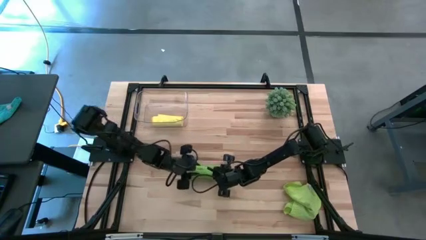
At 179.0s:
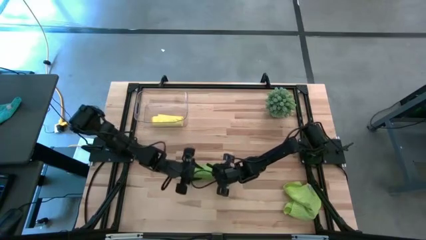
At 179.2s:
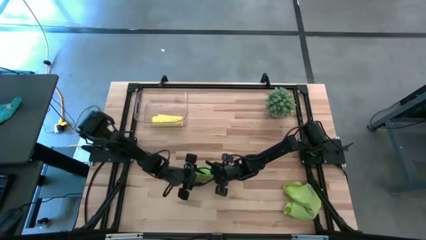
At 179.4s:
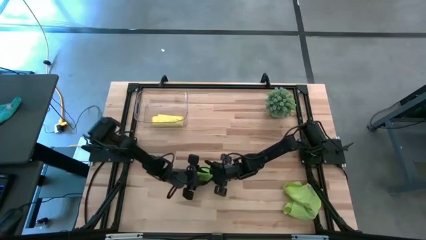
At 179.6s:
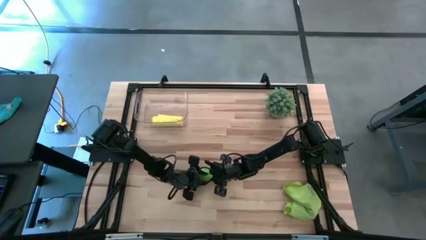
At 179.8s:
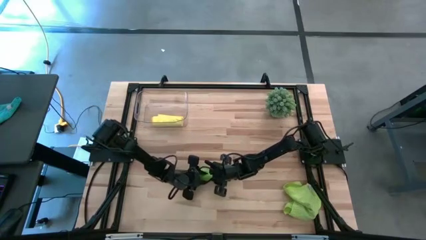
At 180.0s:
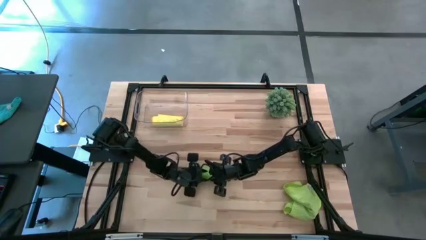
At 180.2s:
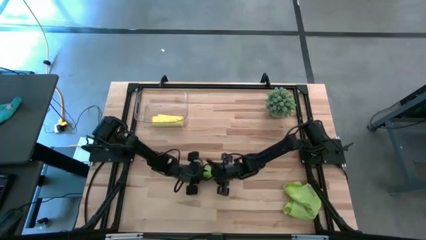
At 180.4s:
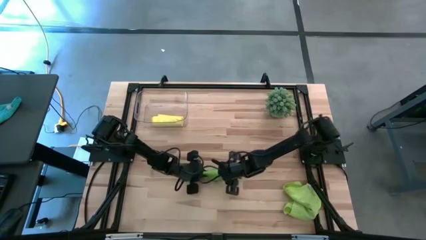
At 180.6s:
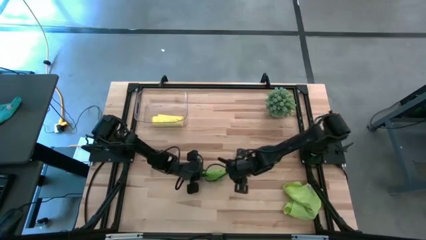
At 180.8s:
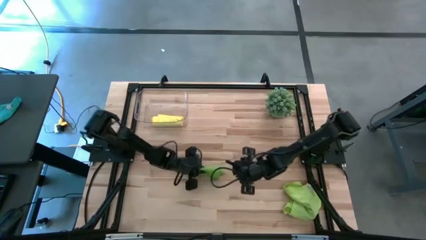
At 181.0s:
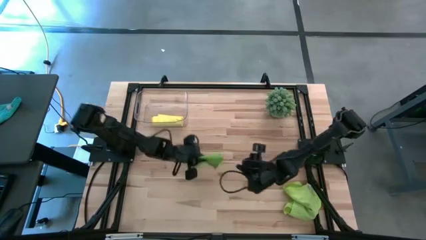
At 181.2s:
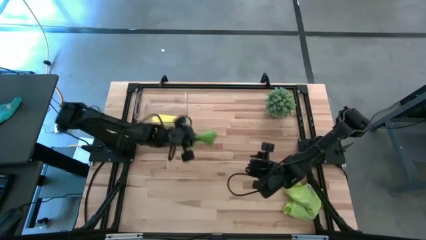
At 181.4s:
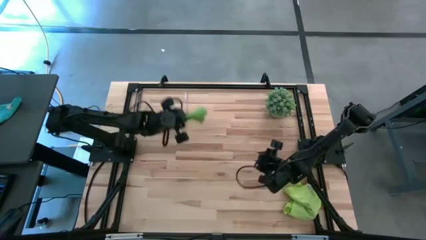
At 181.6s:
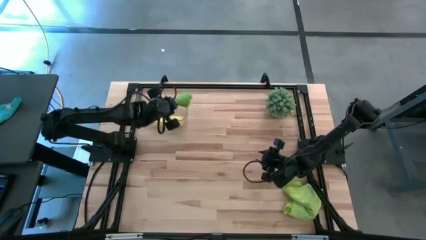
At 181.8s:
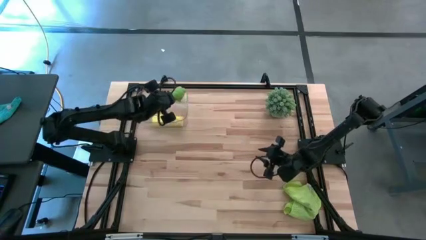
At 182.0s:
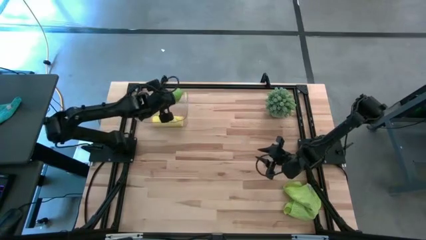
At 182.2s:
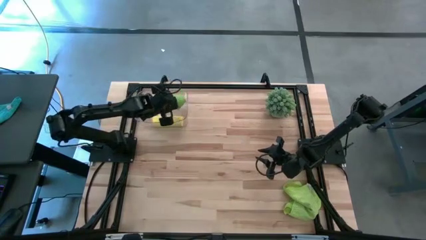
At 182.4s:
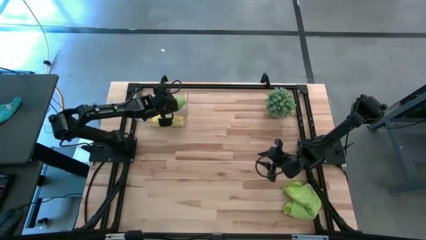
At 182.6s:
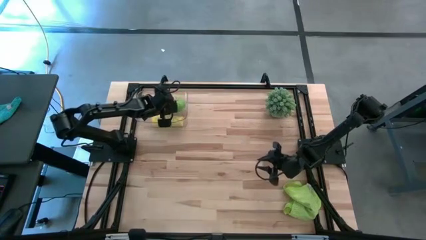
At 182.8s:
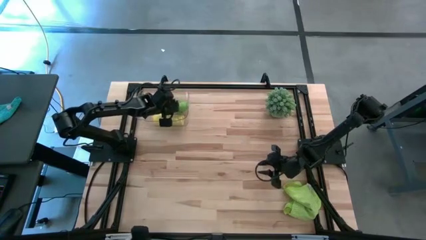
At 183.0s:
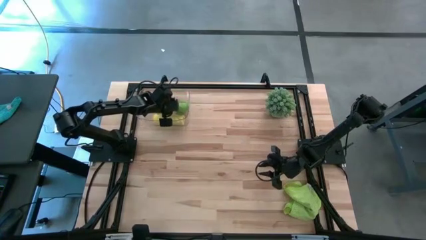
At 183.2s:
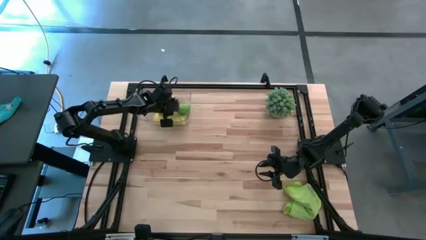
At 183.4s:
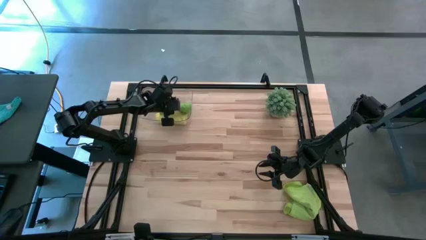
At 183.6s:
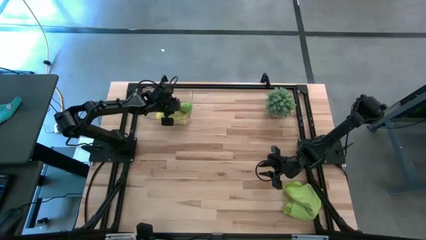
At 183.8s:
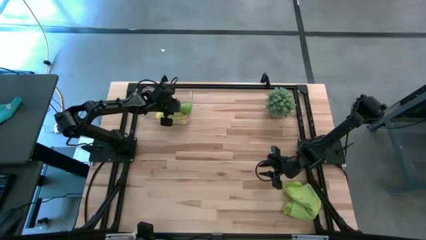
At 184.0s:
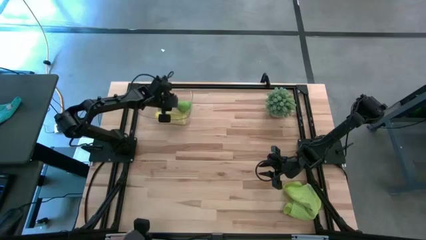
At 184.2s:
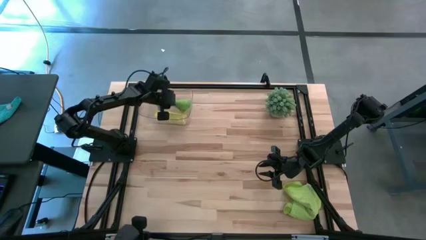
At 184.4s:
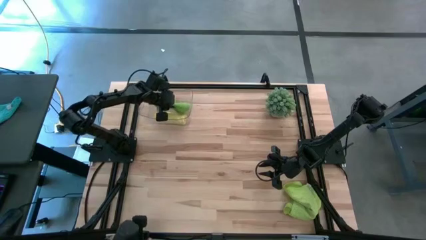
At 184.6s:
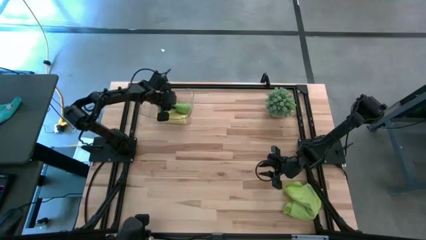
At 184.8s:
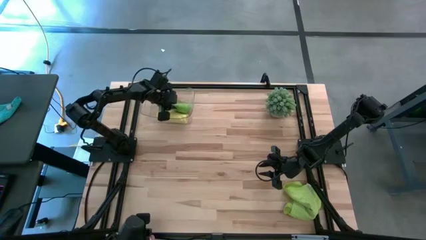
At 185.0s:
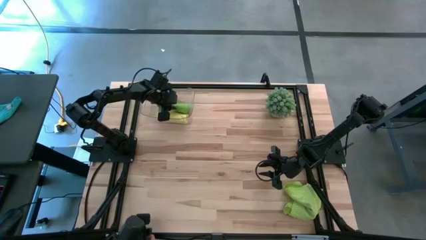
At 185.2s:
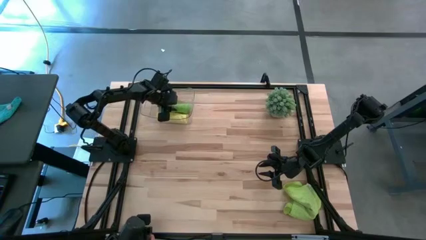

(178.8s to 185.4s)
Task: Roll microfiber towels into tight, uniform cylinder then place into a basket
Put the green microfiber cloth into the transparent bin

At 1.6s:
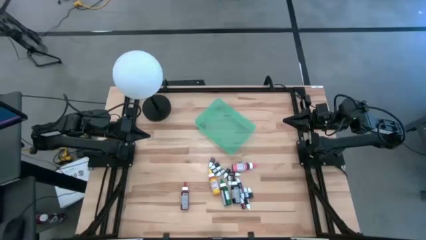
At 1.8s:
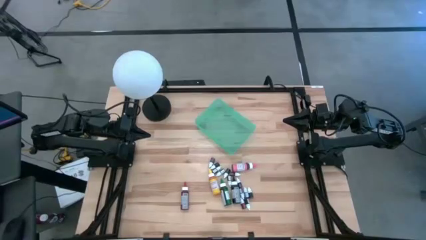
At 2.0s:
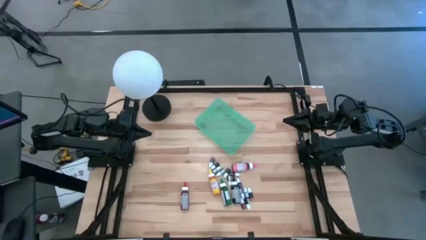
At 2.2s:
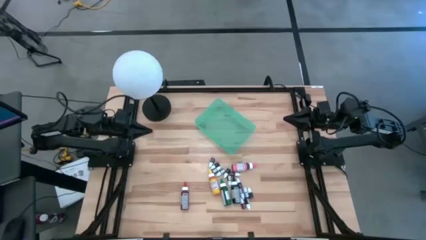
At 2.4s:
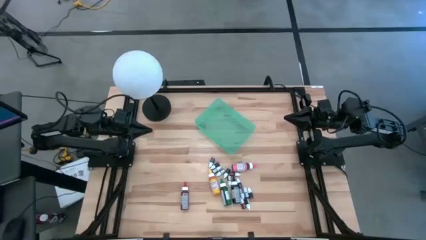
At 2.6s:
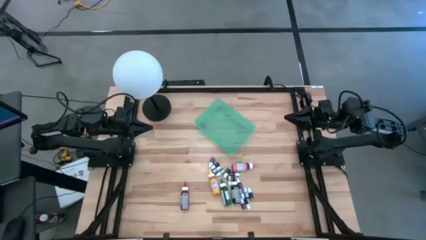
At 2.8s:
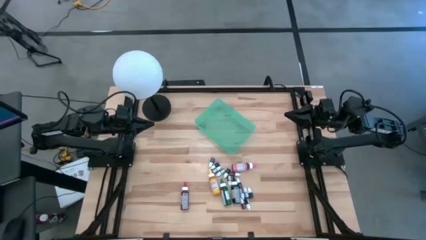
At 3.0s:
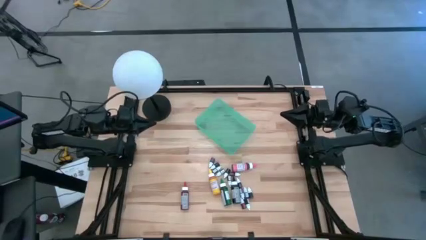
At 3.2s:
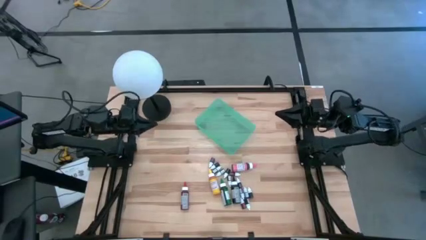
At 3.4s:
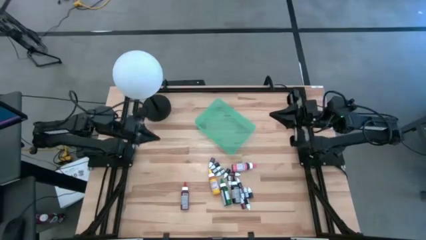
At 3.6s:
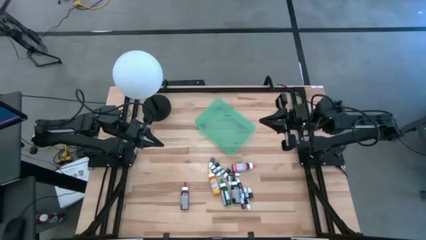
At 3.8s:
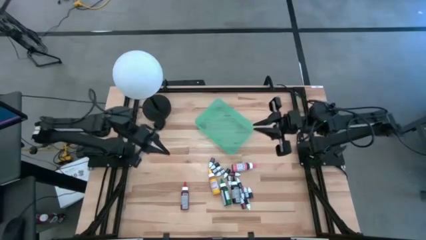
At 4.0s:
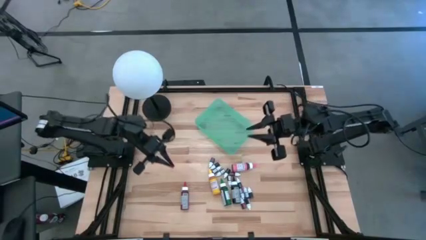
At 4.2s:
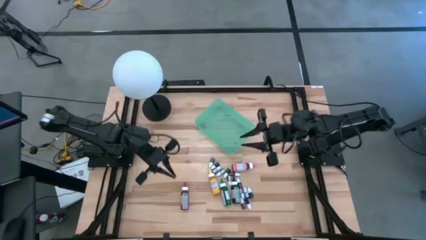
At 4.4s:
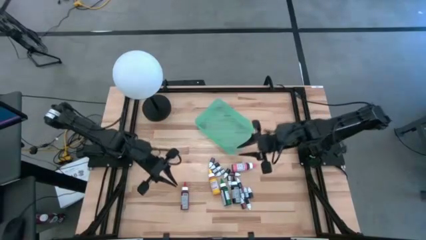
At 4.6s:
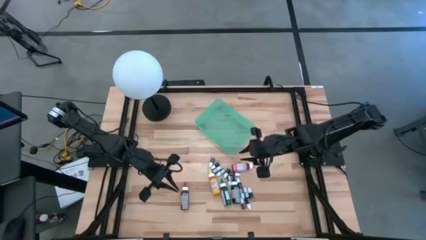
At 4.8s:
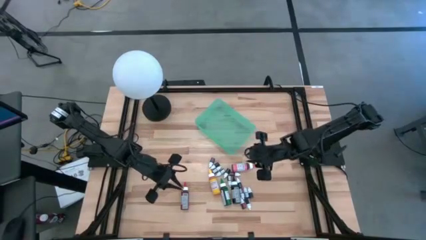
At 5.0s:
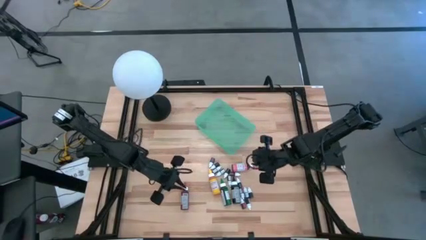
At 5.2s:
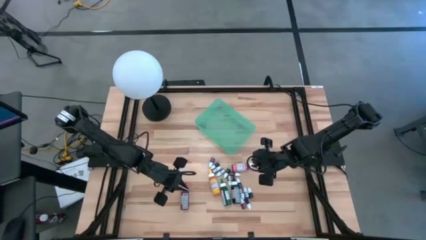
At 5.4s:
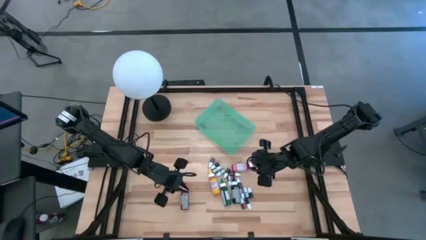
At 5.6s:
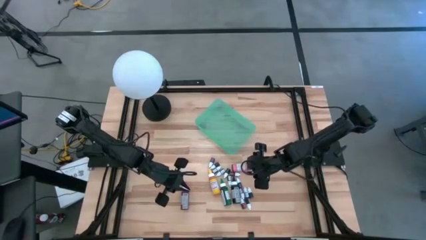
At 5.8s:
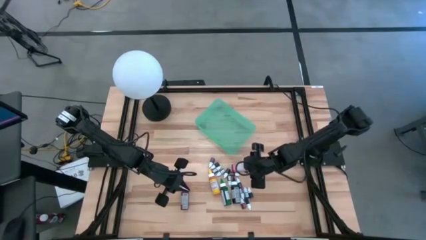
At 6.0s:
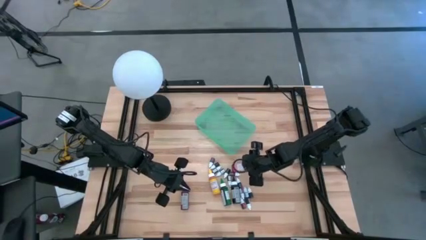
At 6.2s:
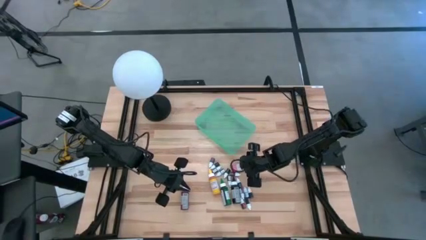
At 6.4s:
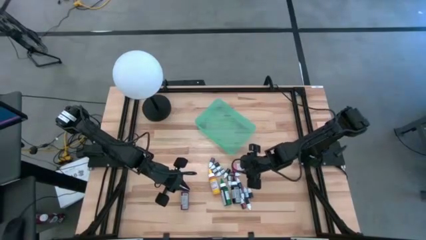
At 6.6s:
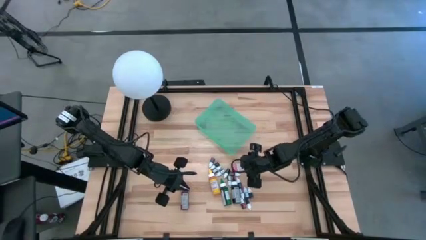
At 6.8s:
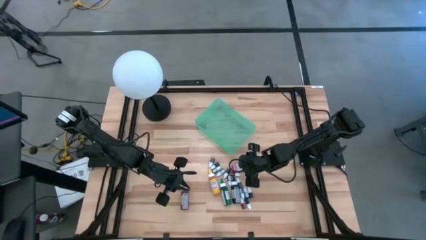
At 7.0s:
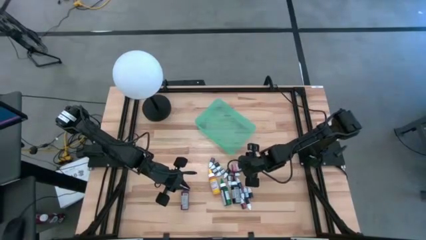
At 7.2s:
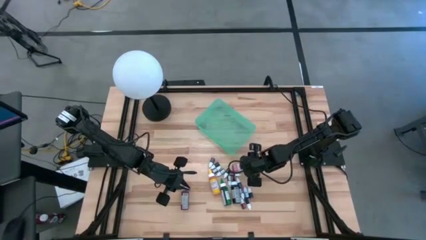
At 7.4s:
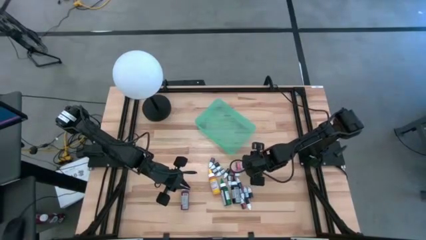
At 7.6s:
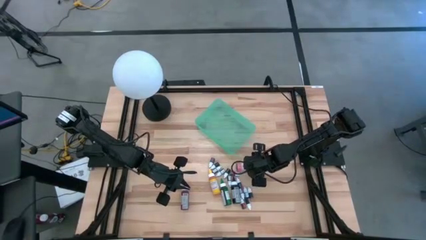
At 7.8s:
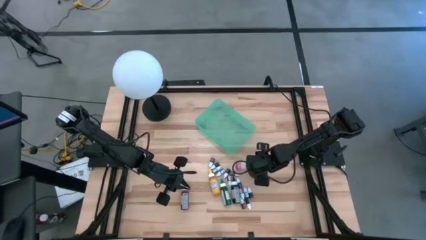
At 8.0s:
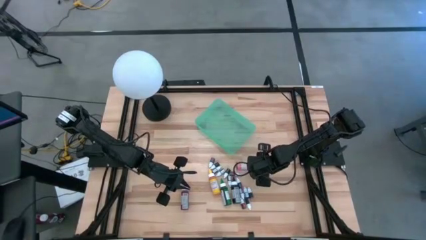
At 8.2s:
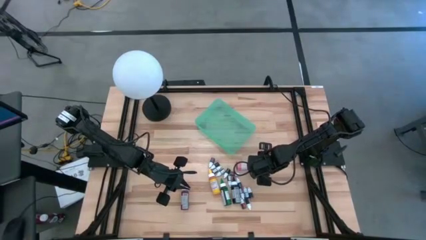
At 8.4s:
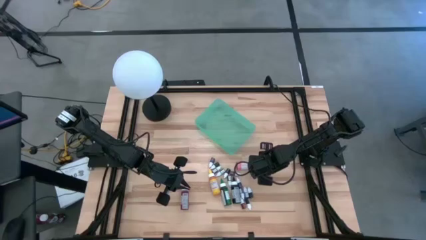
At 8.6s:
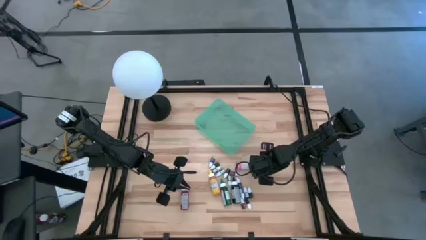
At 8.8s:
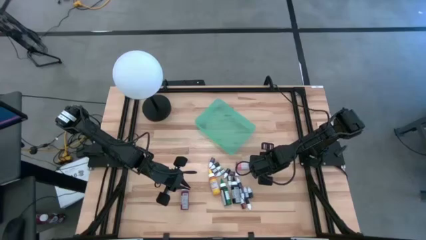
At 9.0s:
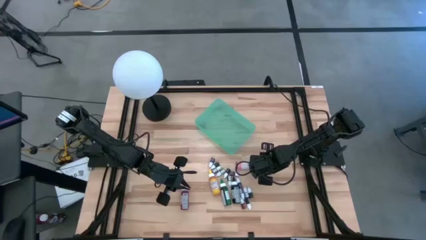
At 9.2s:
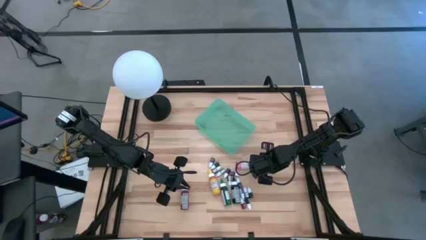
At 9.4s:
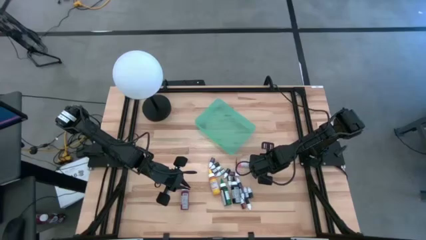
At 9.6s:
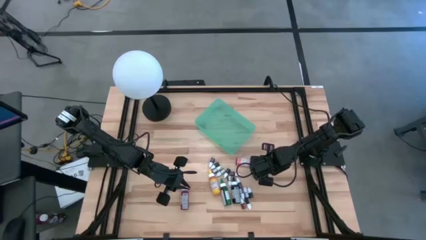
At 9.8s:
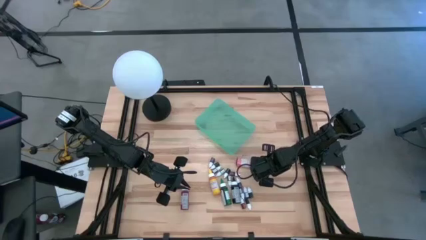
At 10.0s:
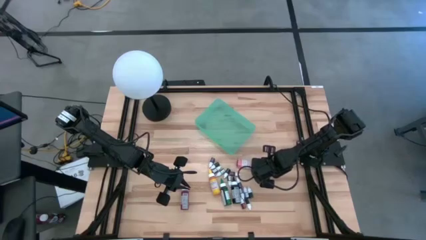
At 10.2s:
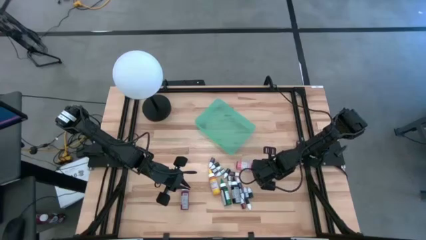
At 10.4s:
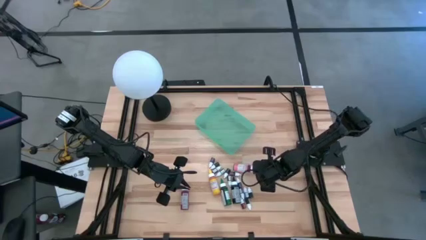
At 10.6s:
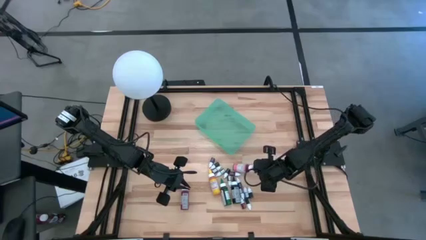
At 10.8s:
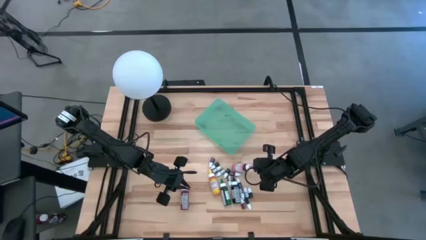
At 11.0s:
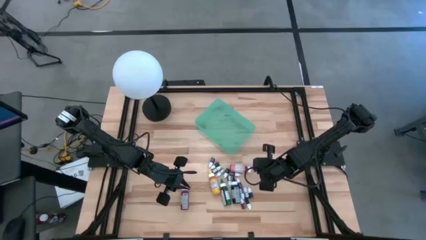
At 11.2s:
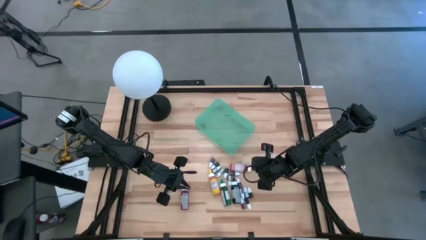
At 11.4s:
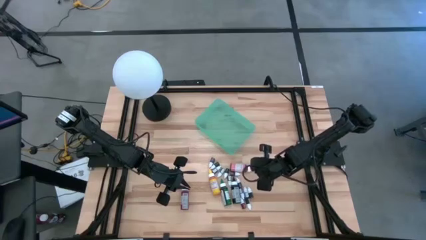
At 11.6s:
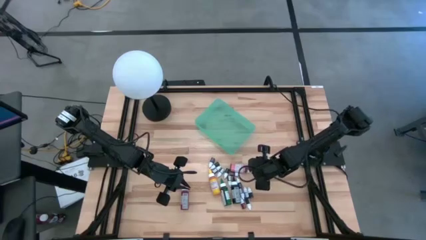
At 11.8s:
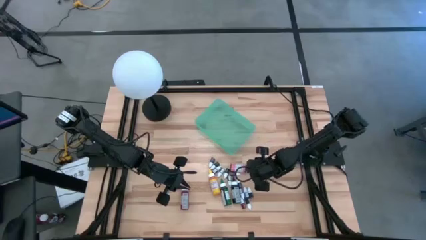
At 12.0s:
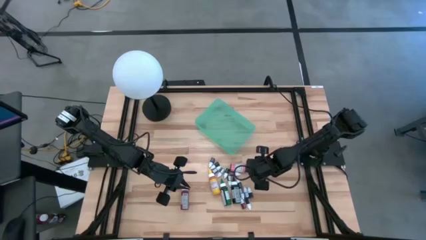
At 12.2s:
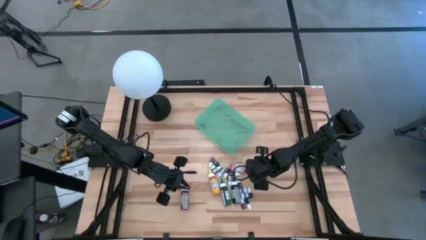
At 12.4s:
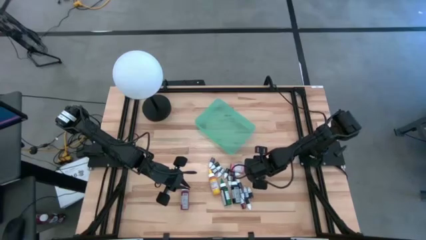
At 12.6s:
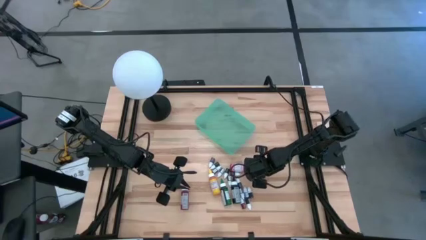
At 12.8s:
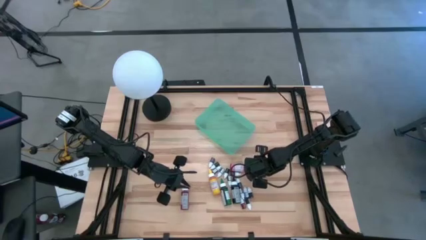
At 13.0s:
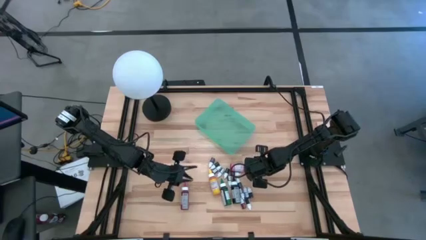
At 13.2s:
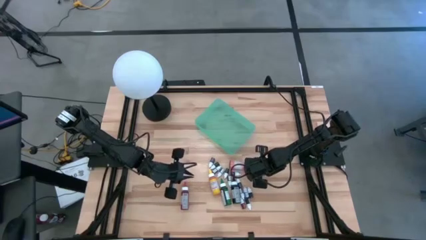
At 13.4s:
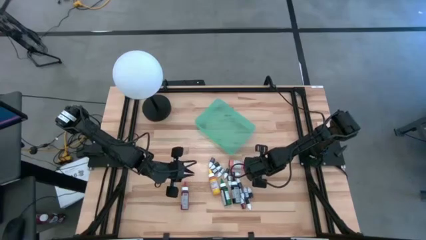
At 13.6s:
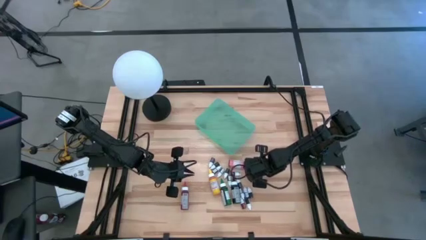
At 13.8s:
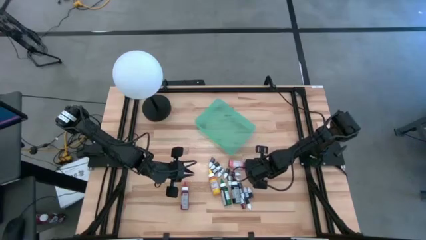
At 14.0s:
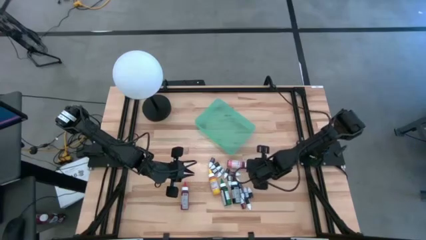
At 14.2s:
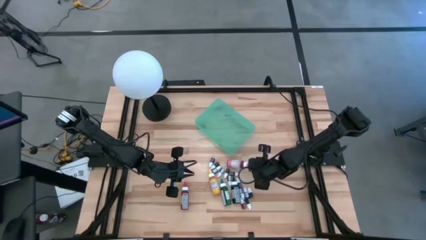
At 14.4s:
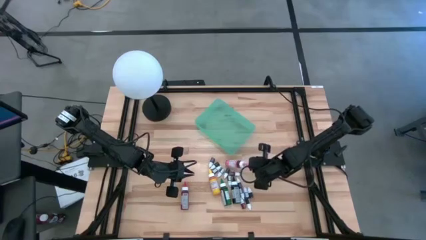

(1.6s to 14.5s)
Task: Pick & Place food coloring
Put the large pink food coloring bottle into the green bin
